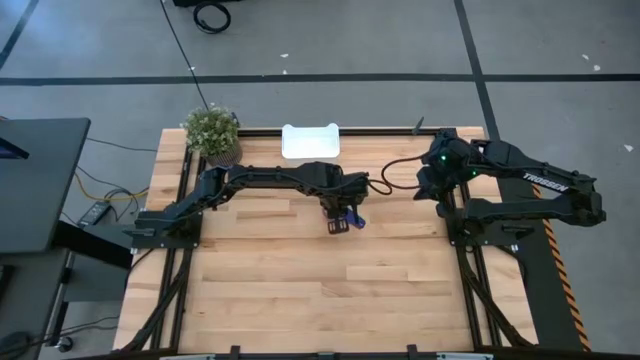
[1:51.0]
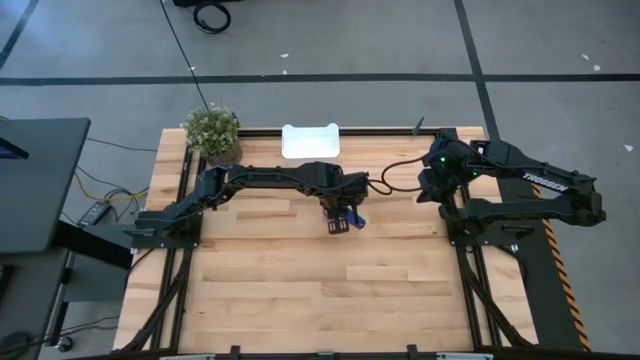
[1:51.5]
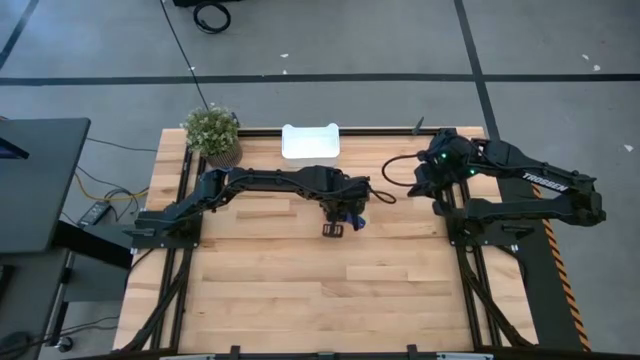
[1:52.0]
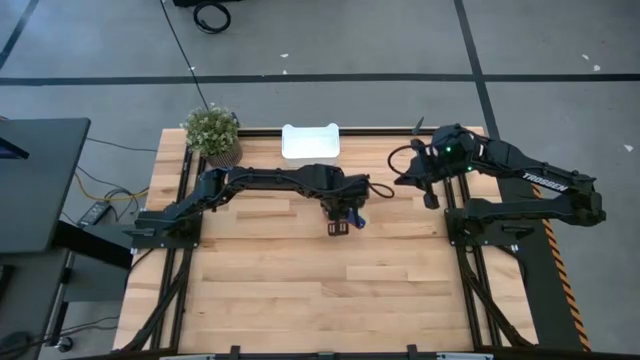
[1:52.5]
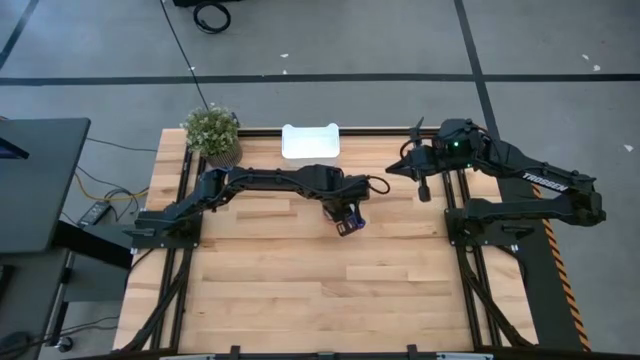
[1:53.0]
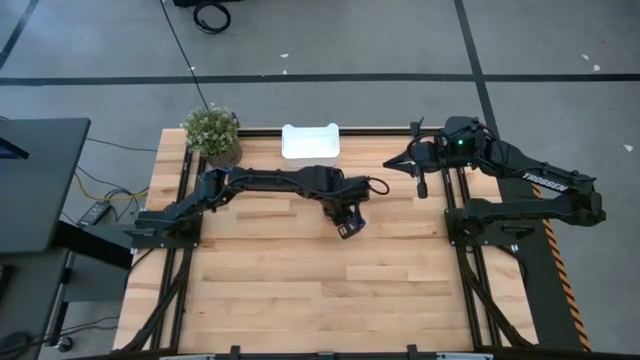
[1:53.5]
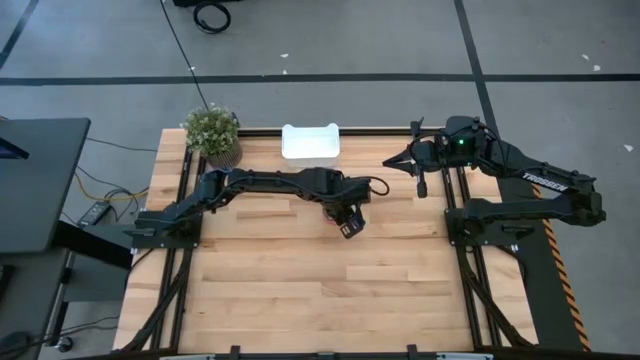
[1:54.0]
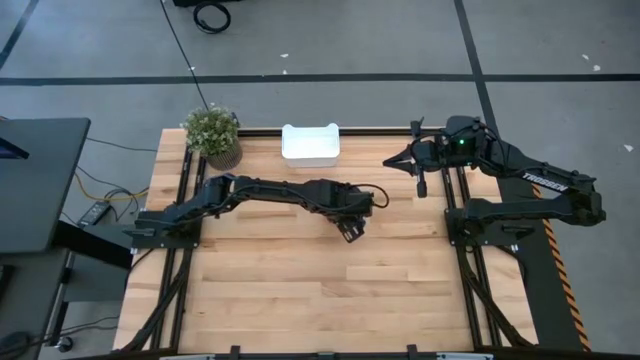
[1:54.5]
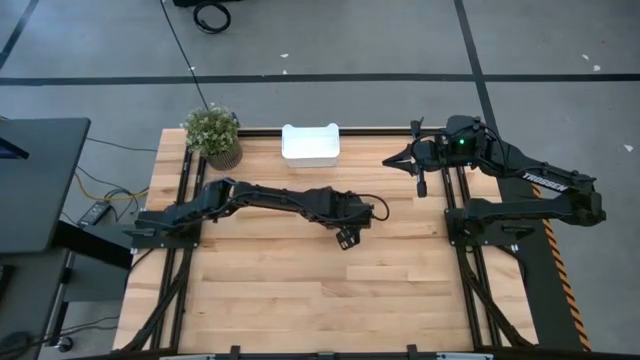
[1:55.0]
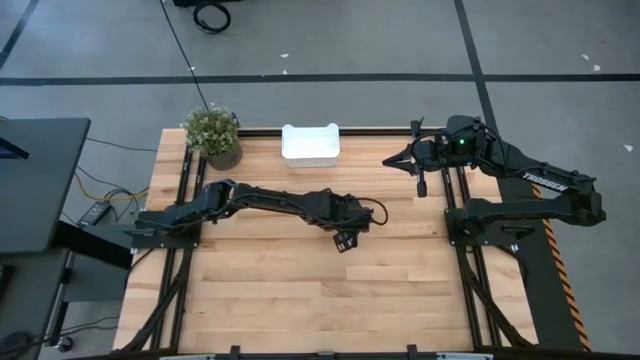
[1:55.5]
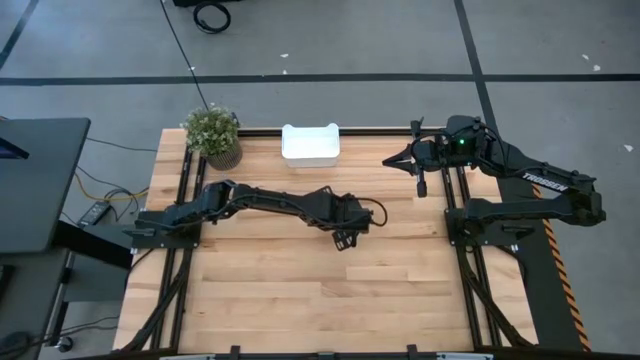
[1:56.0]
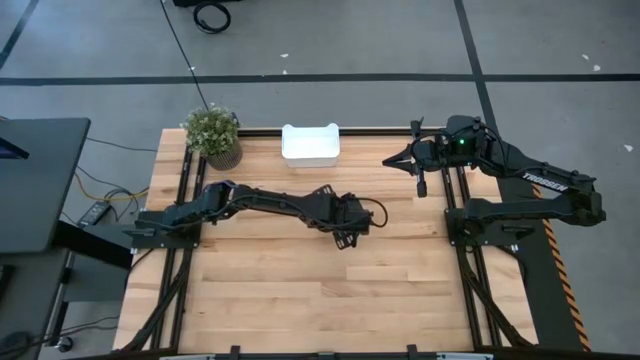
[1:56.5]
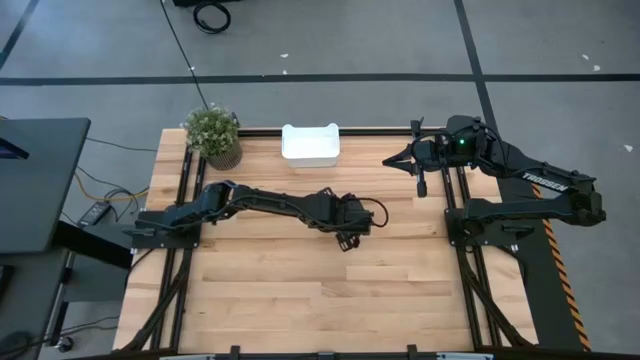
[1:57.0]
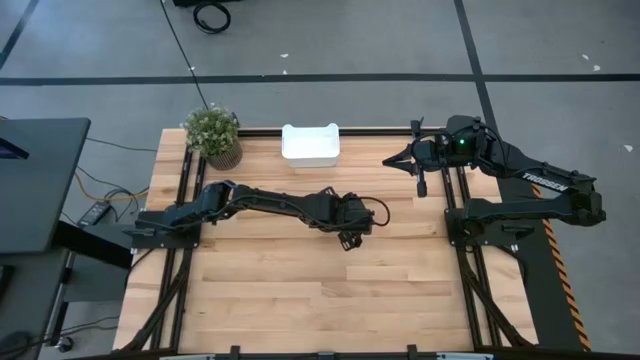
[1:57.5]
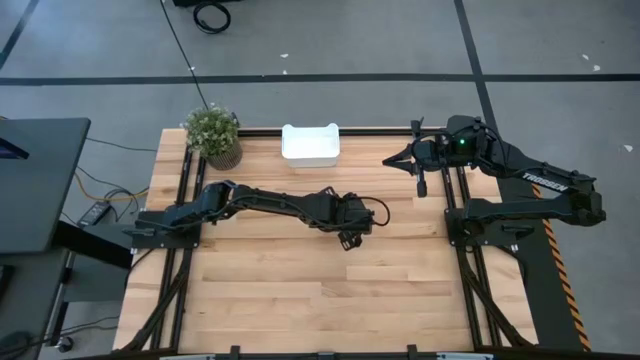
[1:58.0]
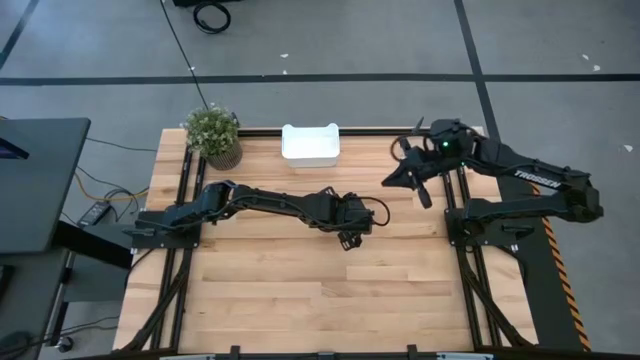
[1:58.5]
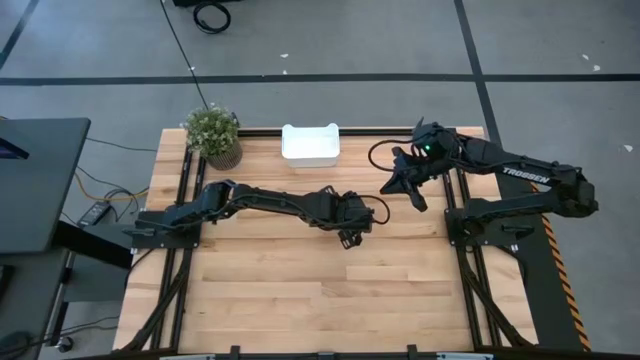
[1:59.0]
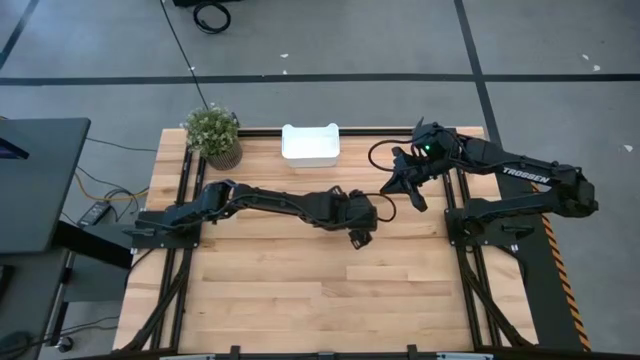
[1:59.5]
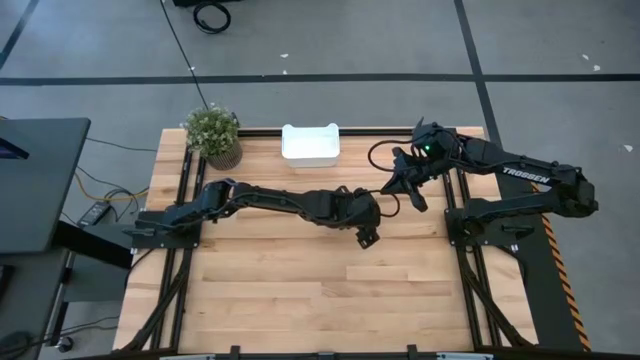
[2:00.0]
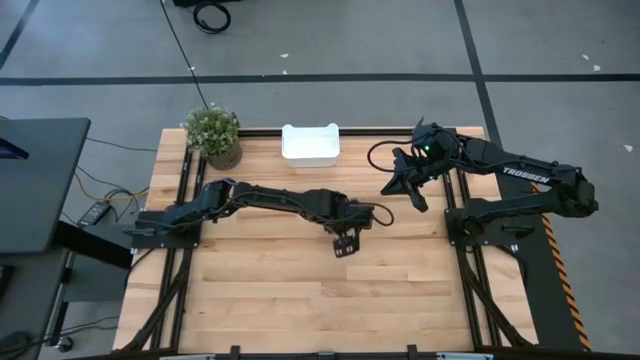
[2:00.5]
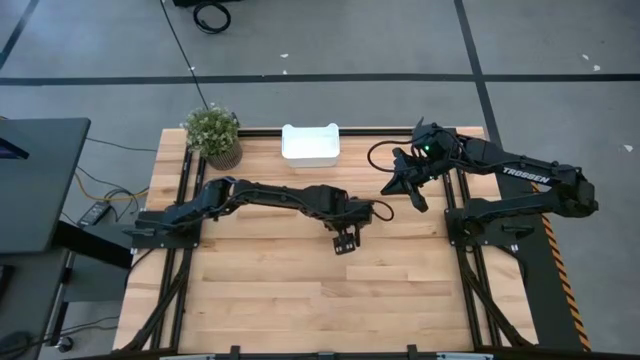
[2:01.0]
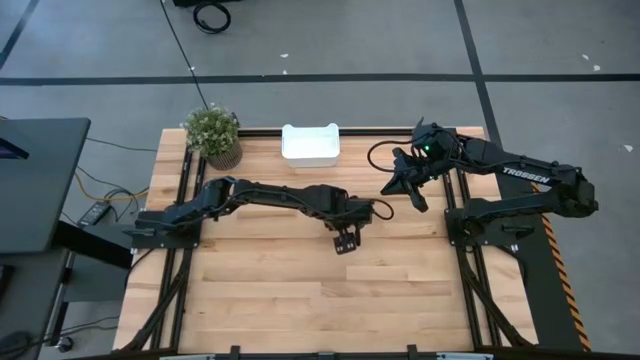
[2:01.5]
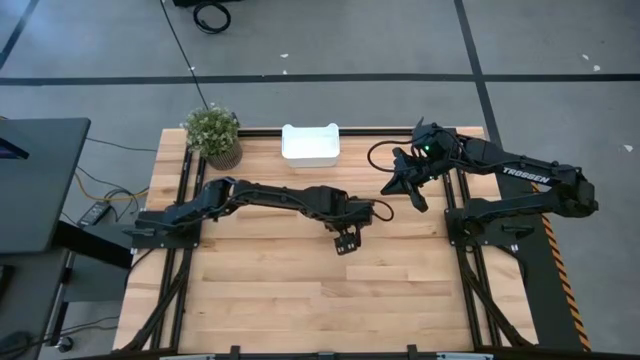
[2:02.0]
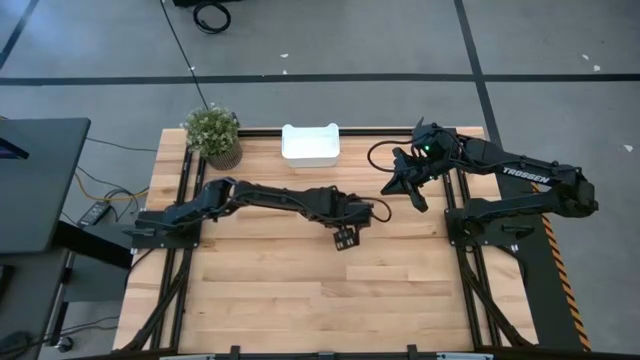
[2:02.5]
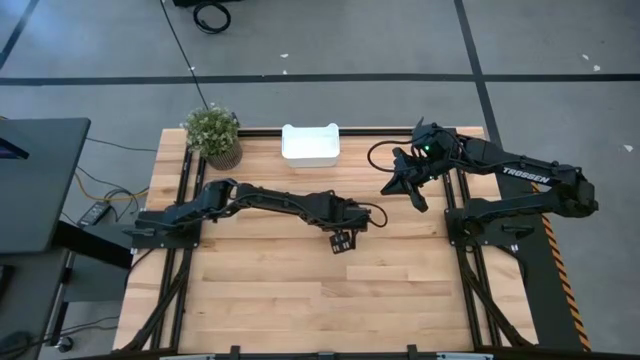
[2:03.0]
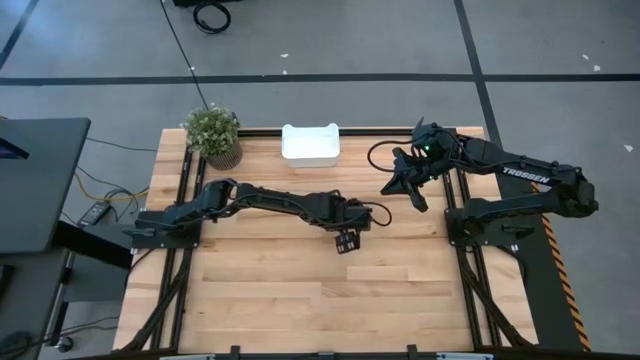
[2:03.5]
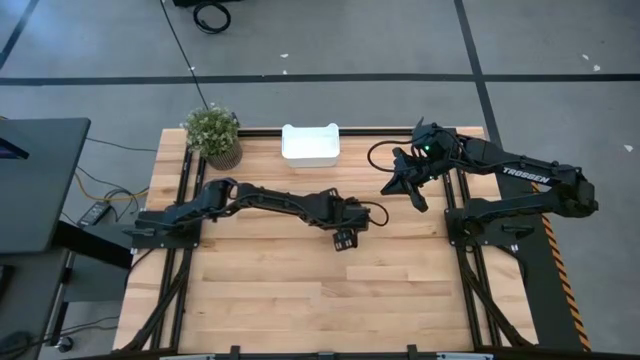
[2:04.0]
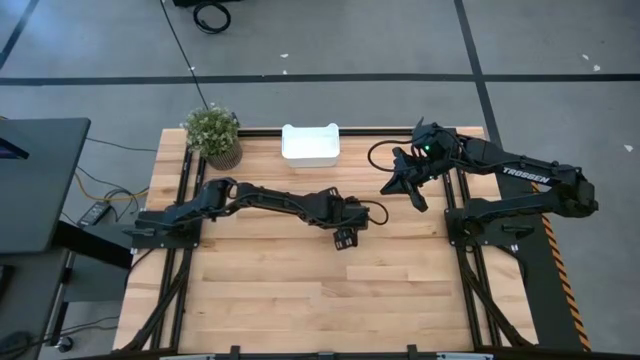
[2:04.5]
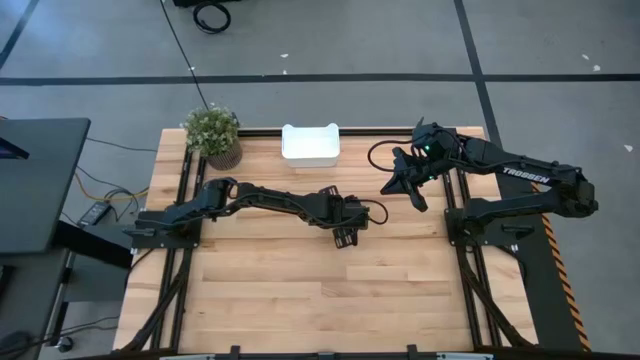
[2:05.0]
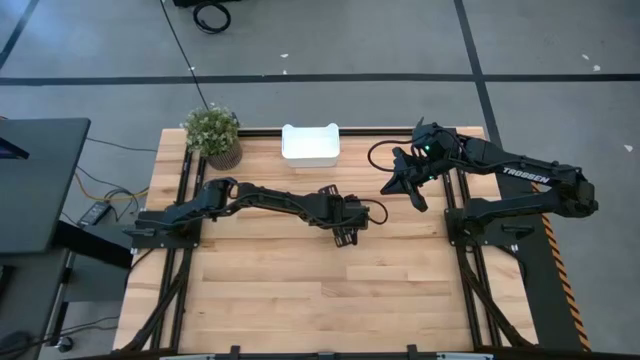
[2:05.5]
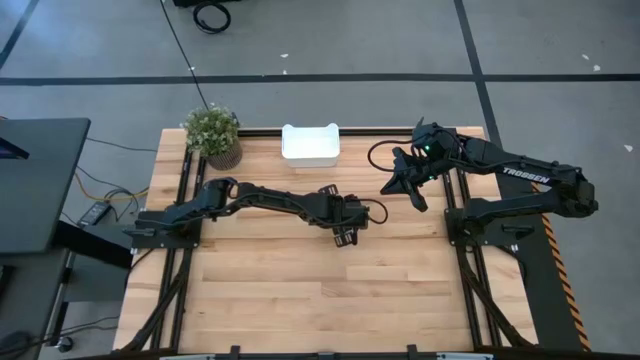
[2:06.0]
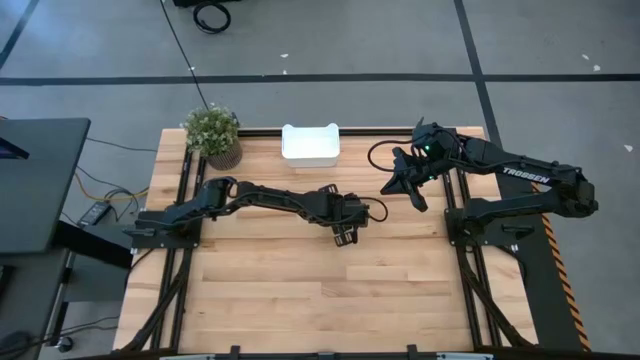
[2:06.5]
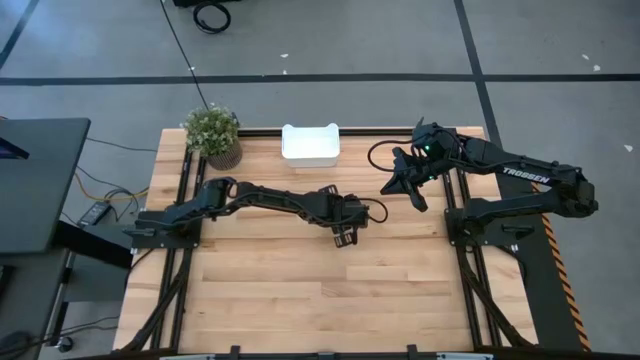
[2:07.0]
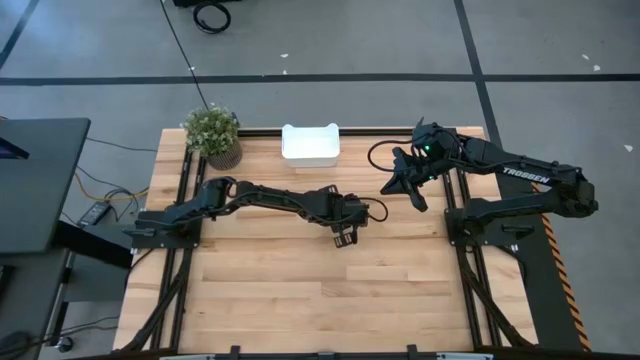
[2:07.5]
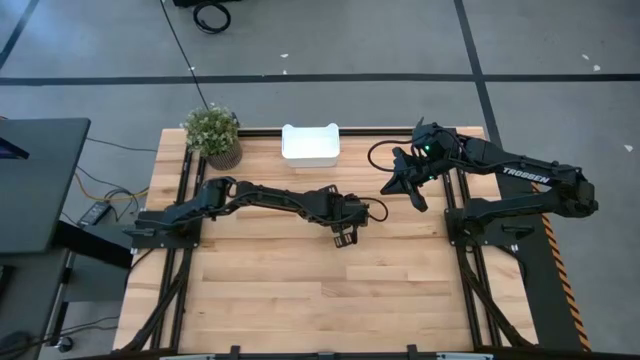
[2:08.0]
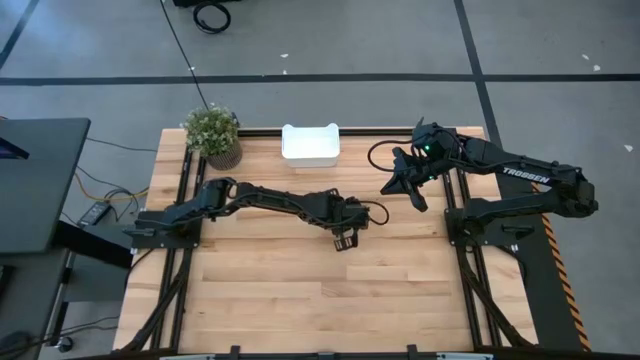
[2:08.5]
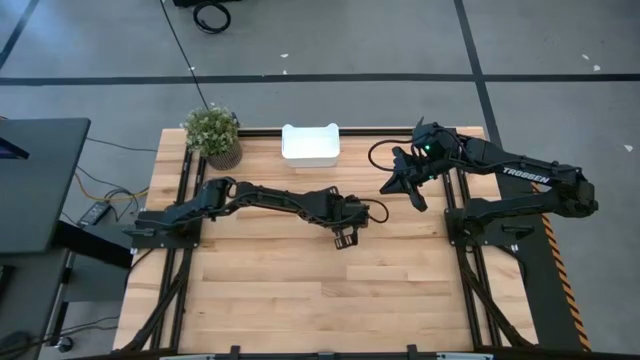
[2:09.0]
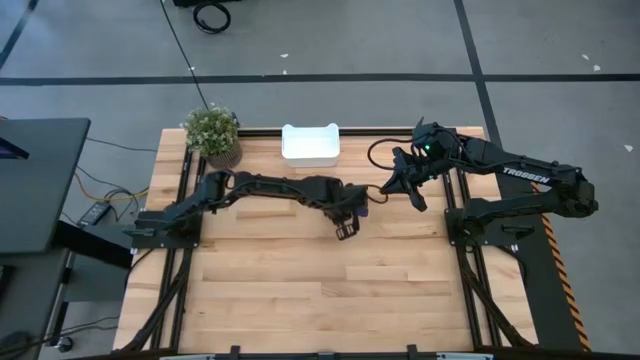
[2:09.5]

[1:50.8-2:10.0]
Task: Nest measuring cups in basket
Put the nested measuring cups into the white bin
